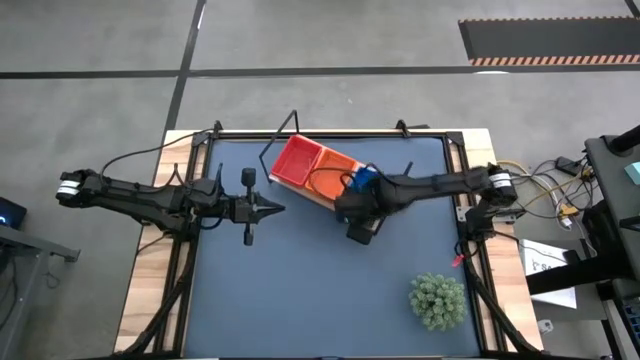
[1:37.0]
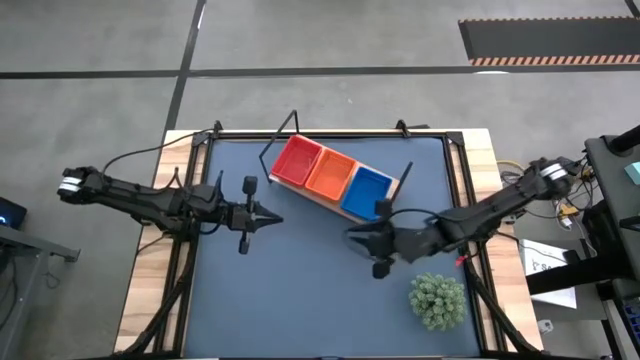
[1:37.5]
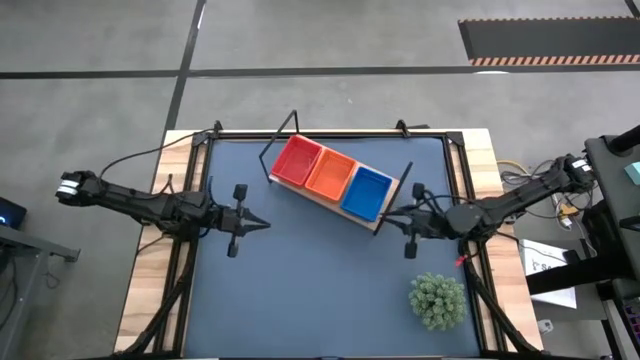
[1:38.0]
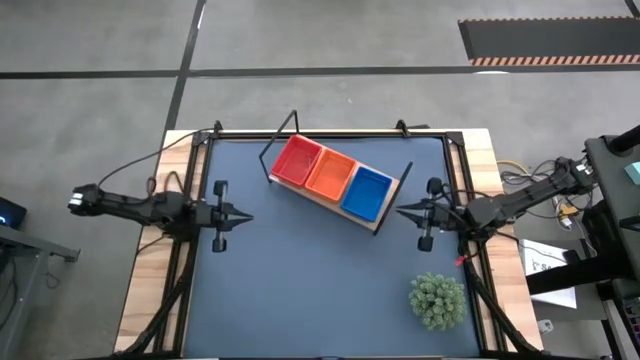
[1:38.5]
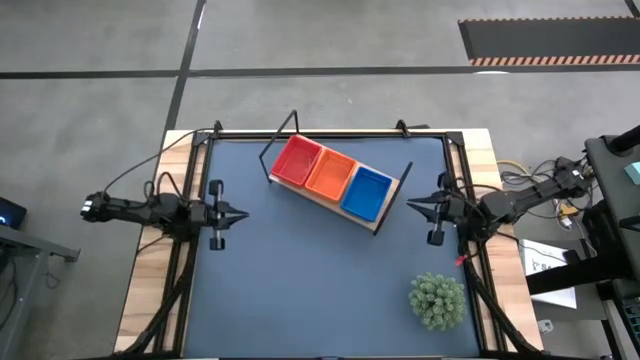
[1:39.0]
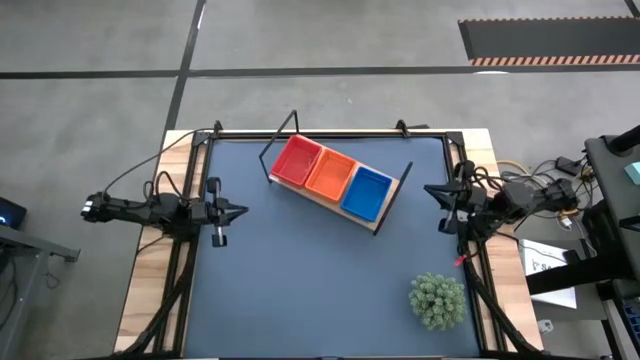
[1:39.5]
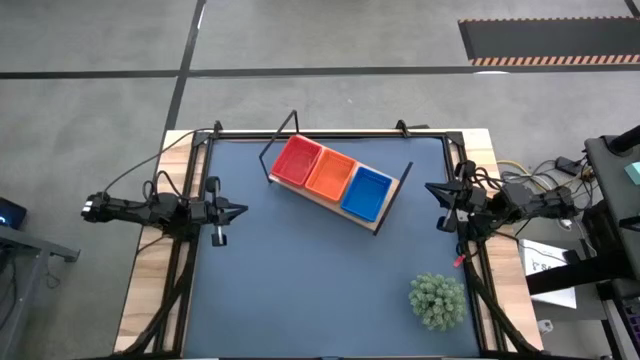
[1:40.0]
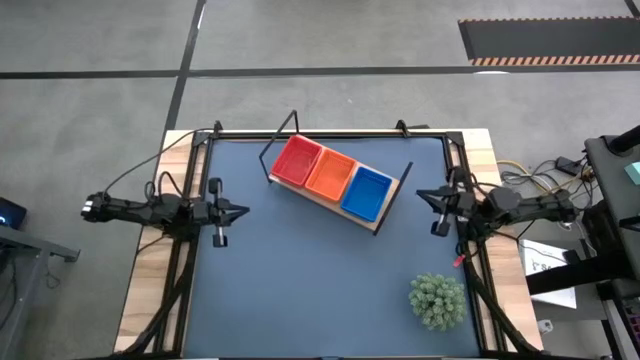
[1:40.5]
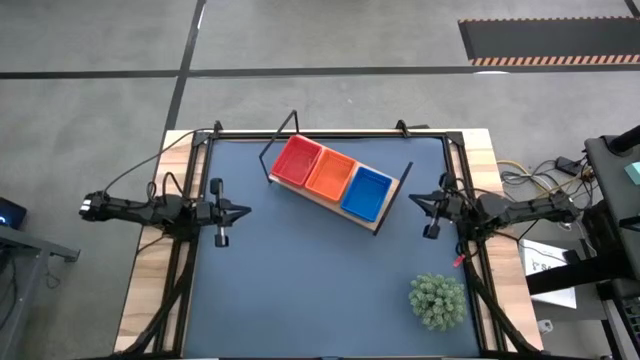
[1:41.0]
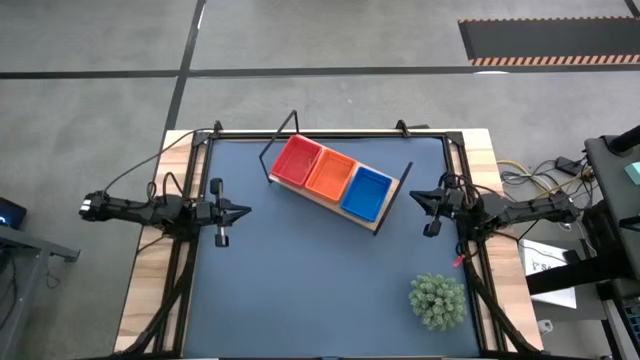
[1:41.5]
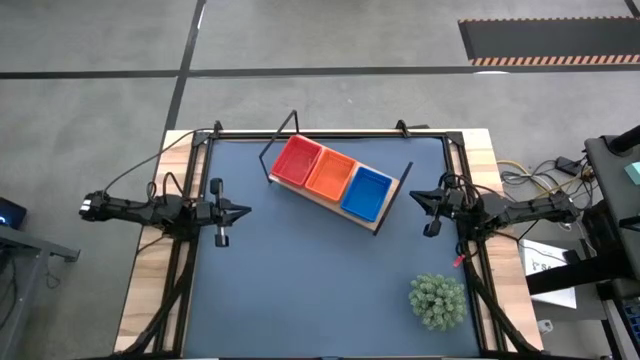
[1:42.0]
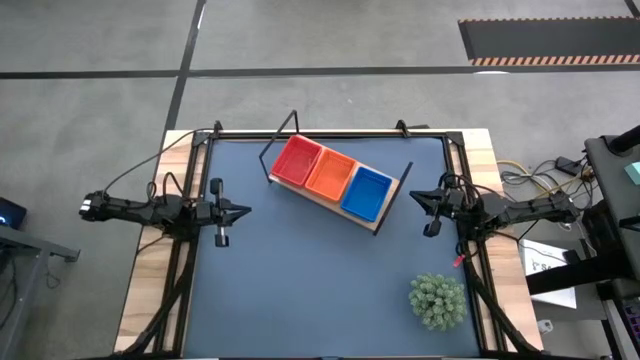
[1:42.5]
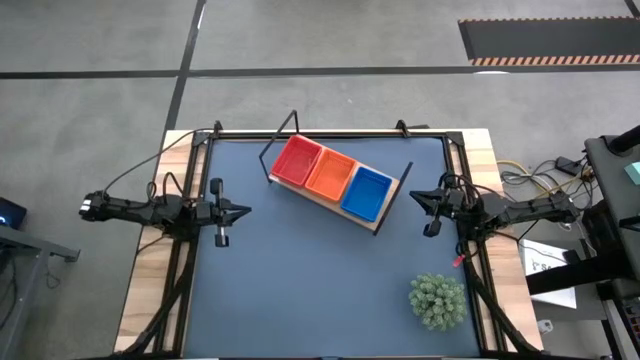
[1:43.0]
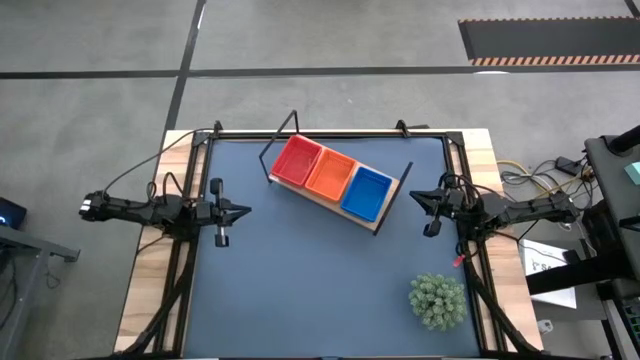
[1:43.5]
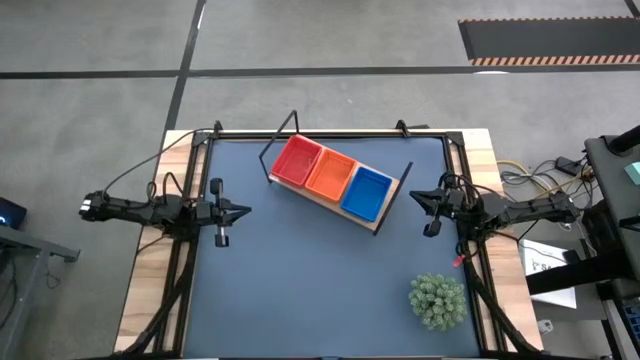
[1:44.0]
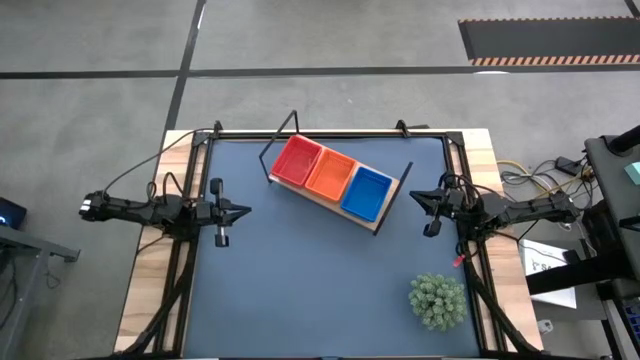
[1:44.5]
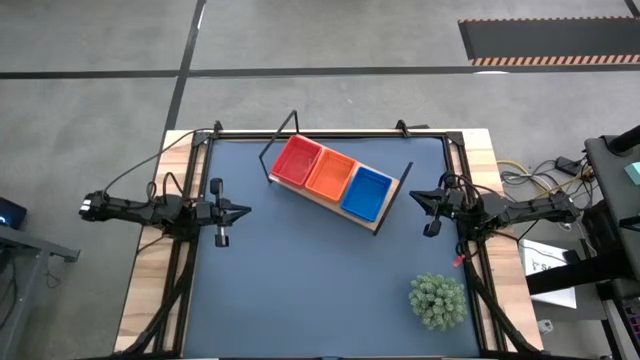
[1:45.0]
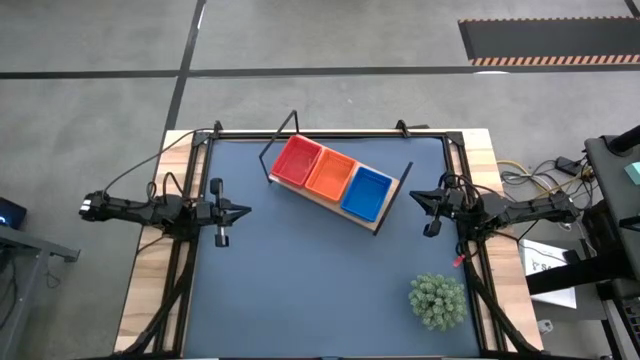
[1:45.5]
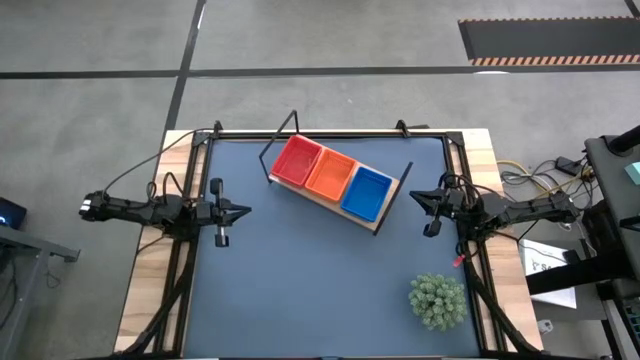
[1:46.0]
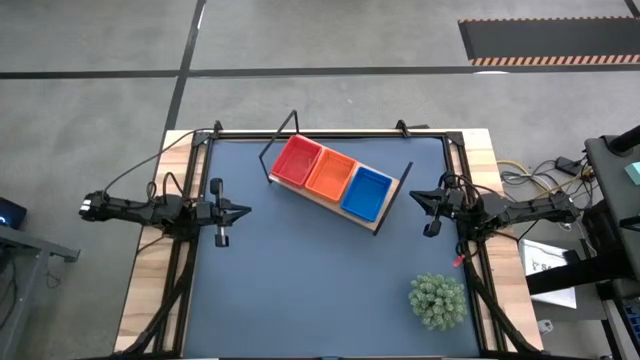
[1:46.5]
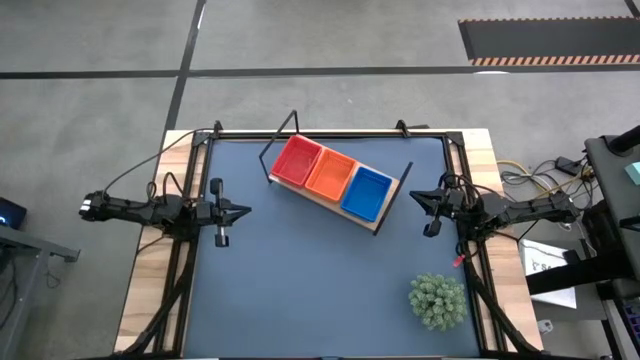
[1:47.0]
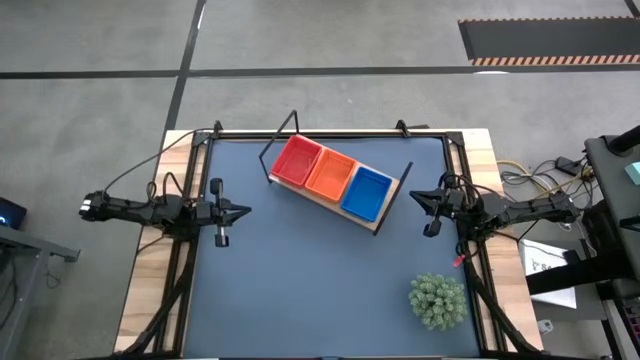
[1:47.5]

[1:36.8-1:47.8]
Task: Stack baskets on shelf by color
Return to Home Position

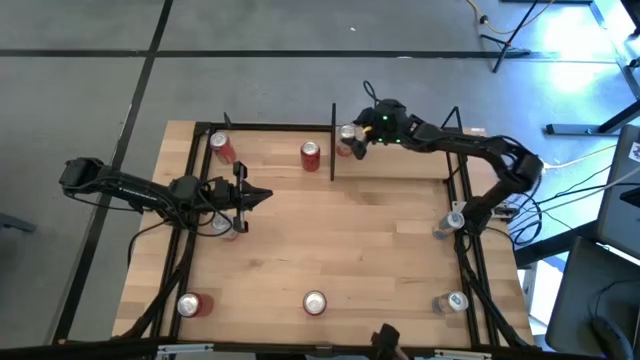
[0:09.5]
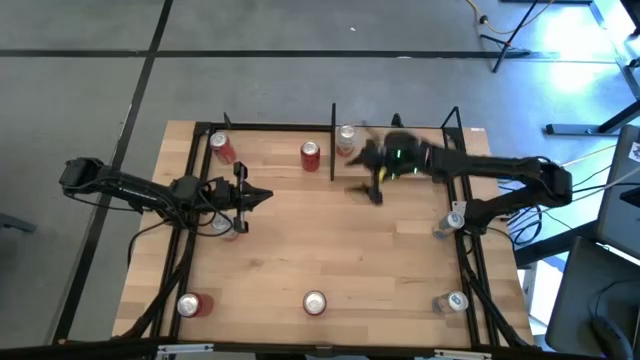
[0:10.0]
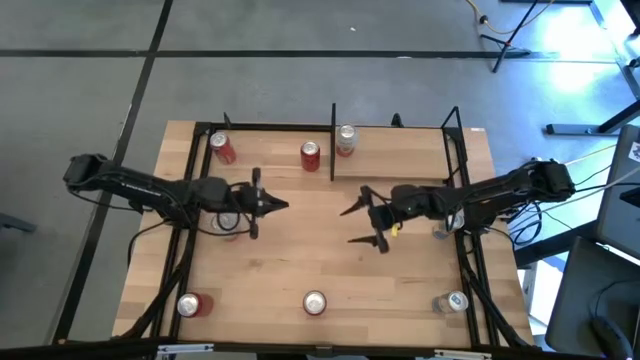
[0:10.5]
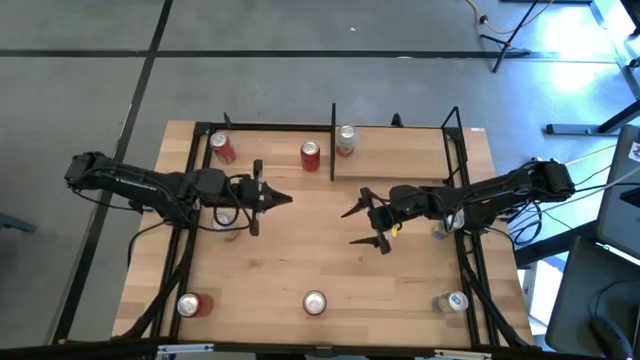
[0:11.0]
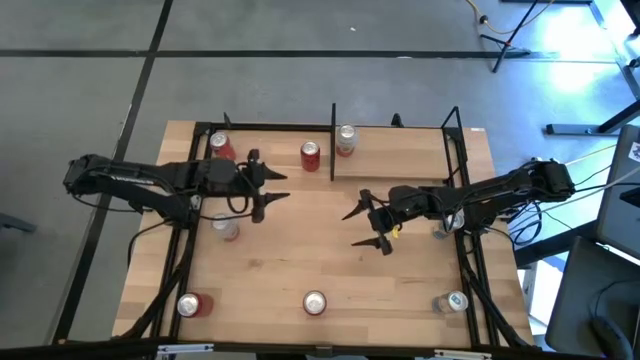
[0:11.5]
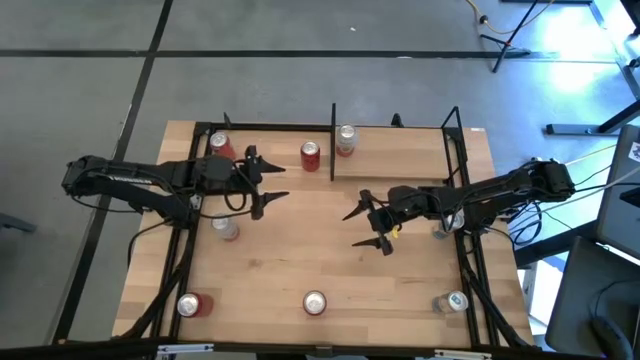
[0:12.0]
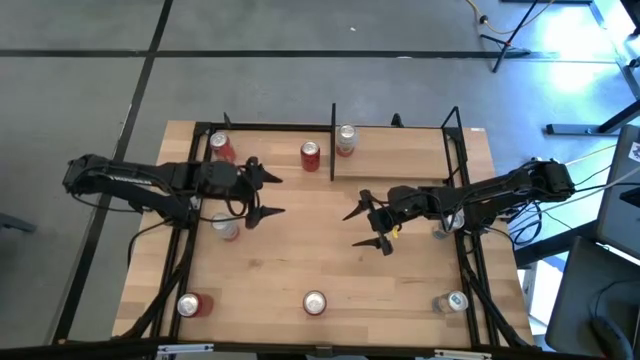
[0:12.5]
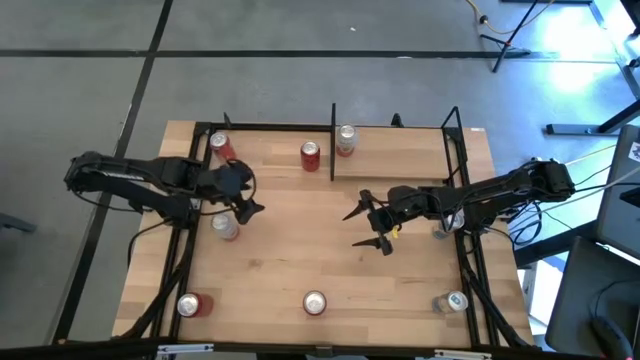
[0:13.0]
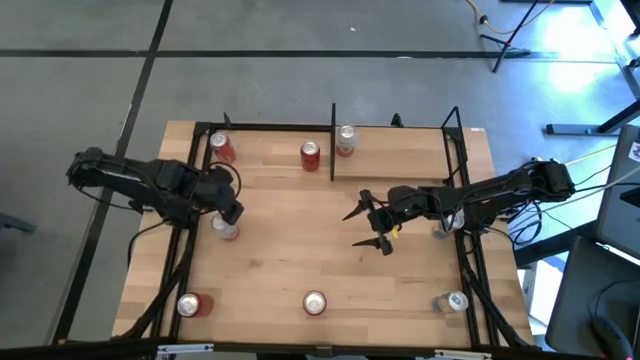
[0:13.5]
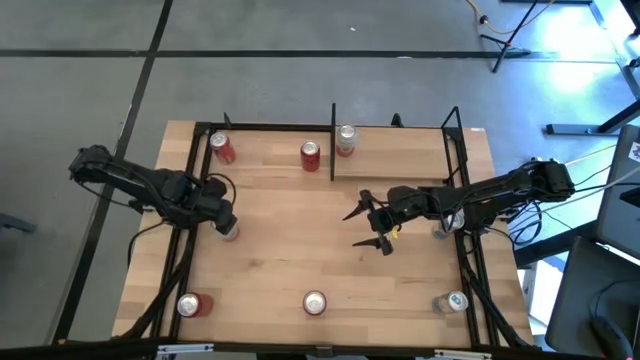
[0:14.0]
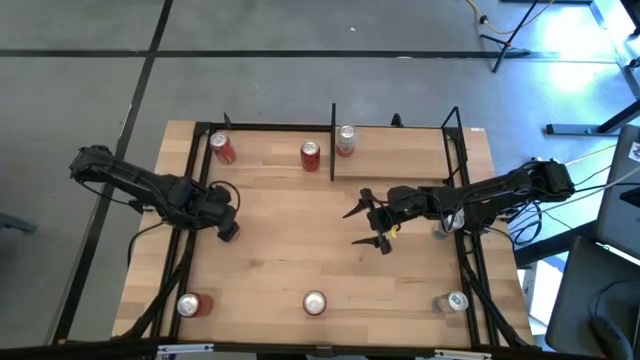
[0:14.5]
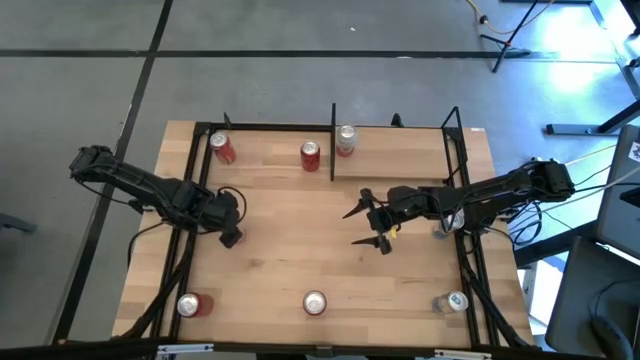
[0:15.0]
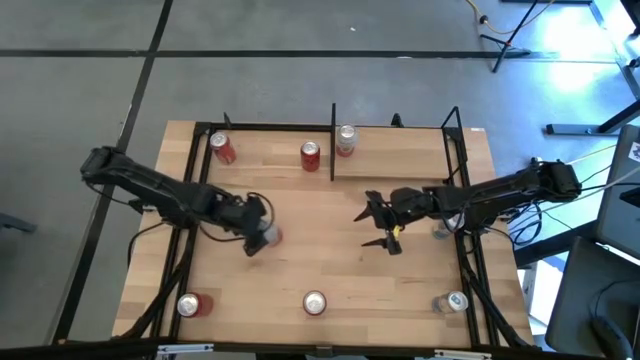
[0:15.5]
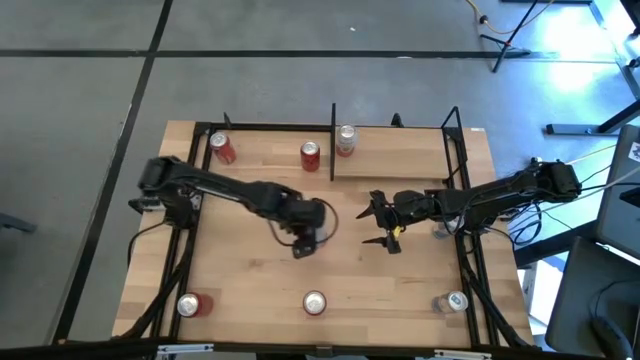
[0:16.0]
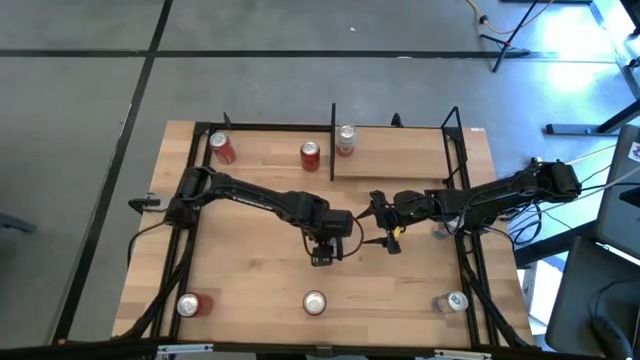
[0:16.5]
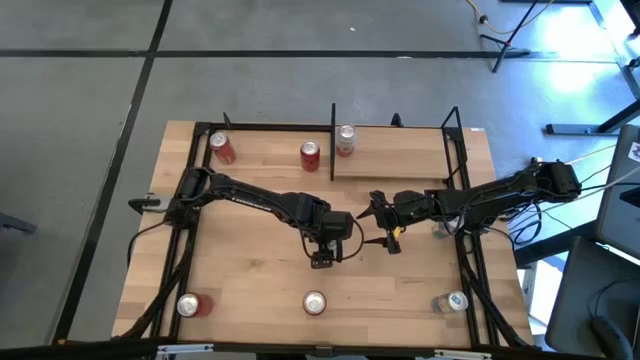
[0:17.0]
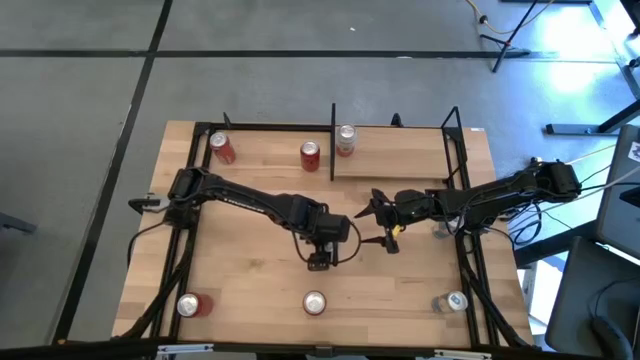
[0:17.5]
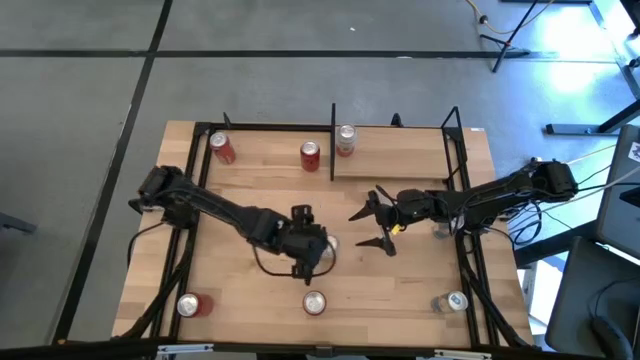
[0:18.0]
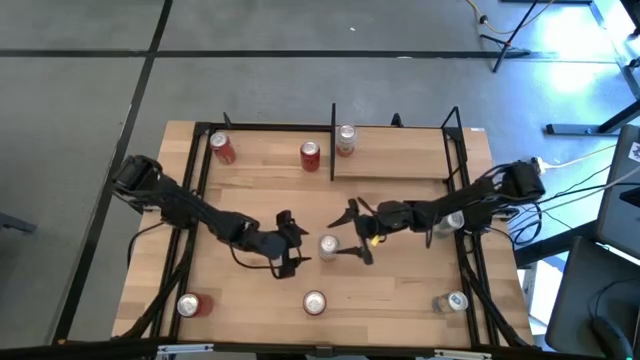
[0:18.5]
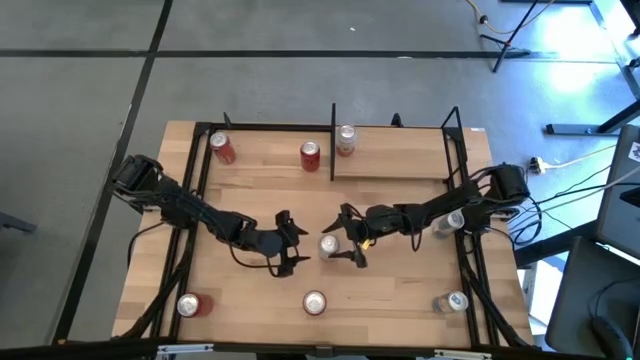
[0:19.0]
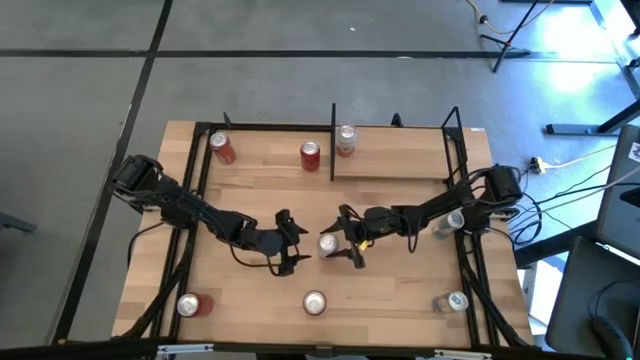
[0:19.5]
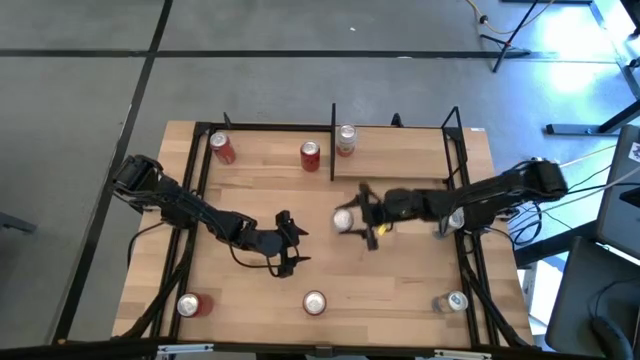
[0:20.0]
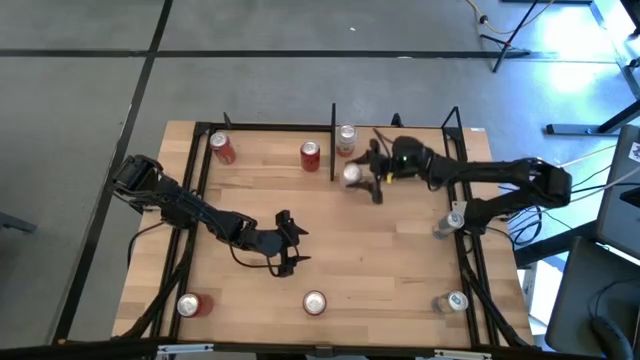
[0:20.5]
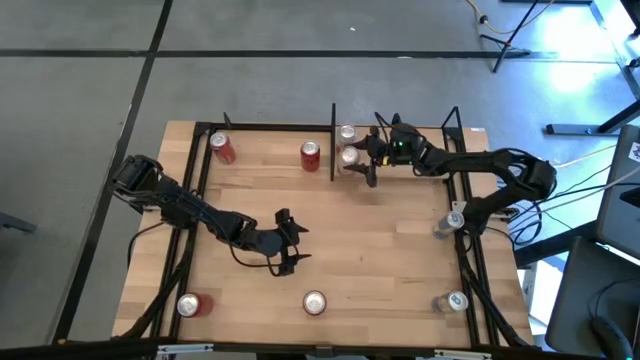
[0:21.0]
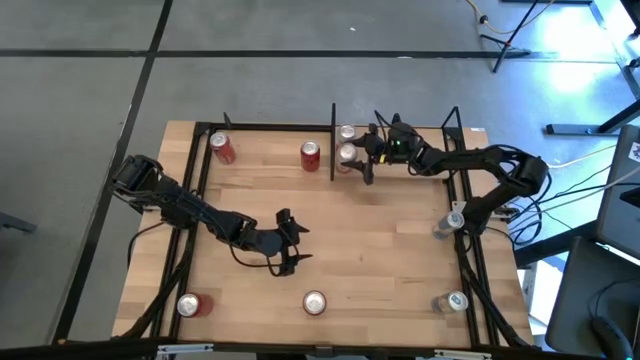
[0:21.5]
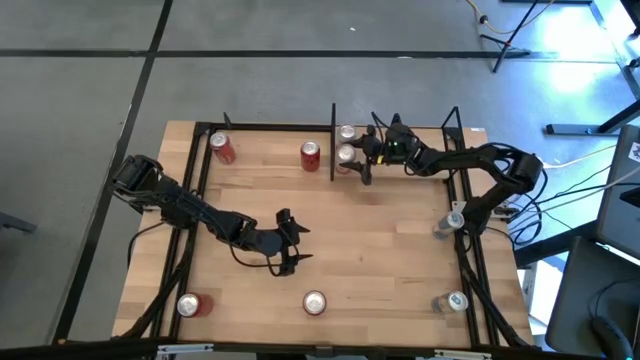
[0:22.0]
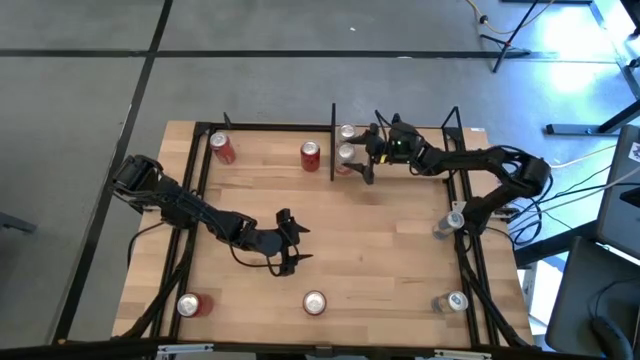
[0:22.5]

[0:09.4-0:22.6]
Task: Place canned beverage on shelf
Put the pink white soda can on the shelf aligned with the other pink white soda can
